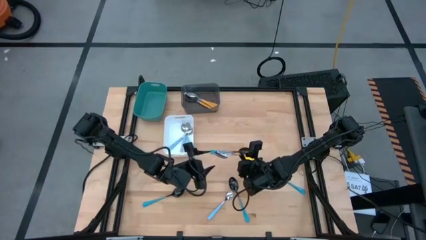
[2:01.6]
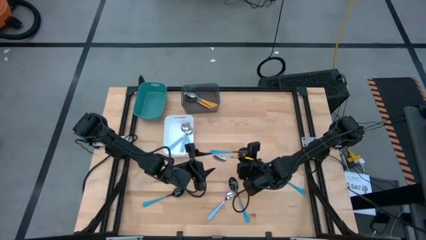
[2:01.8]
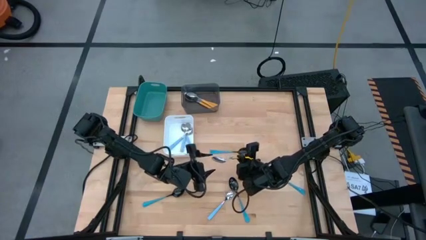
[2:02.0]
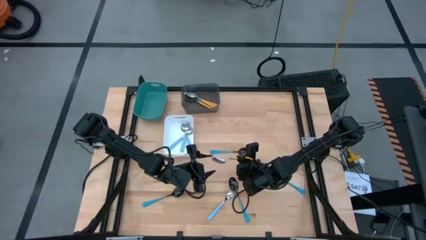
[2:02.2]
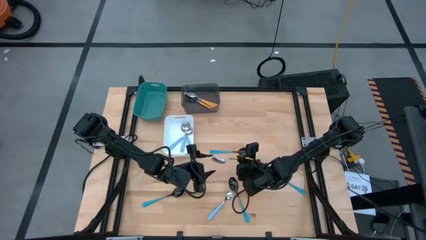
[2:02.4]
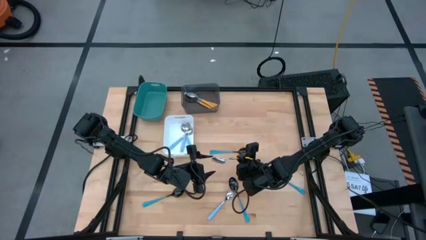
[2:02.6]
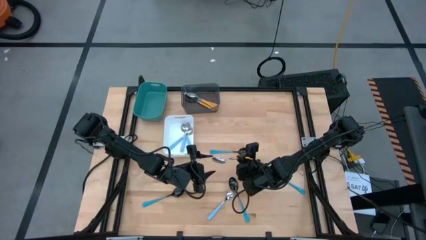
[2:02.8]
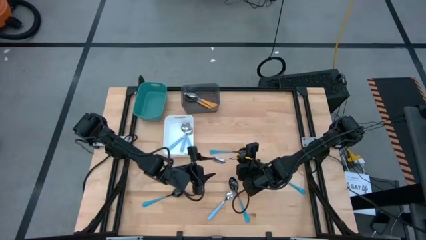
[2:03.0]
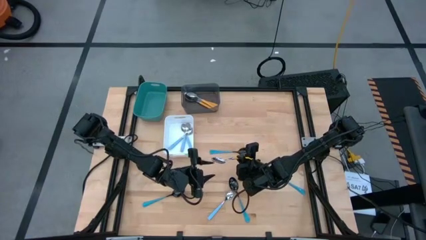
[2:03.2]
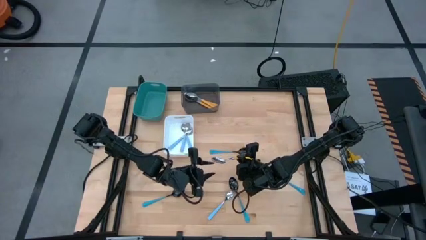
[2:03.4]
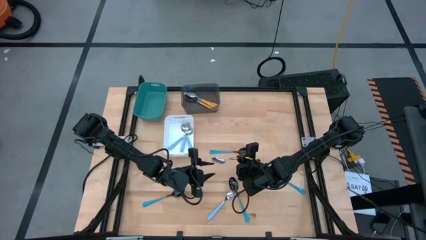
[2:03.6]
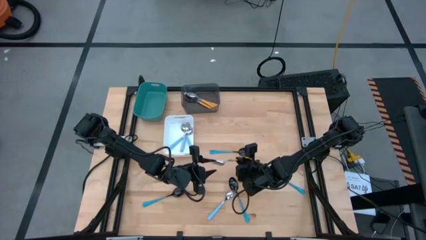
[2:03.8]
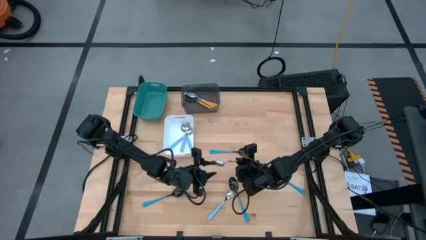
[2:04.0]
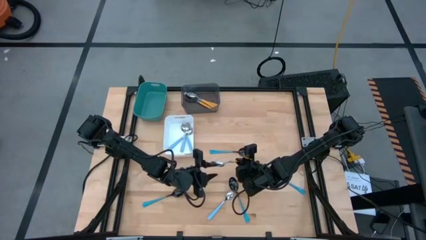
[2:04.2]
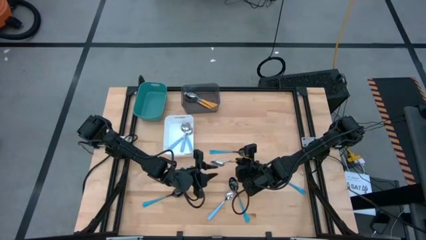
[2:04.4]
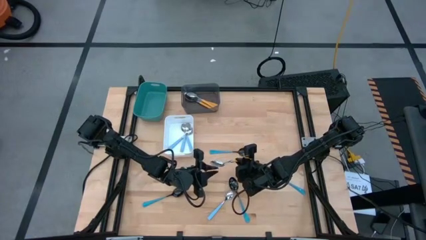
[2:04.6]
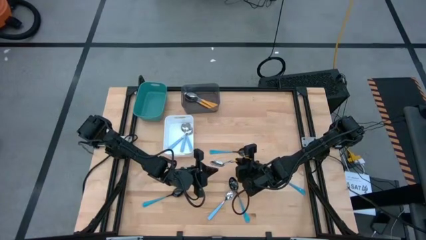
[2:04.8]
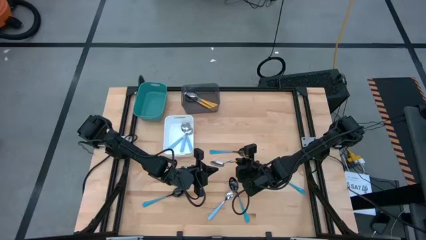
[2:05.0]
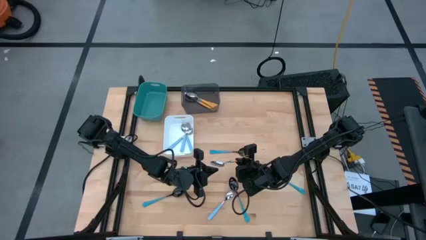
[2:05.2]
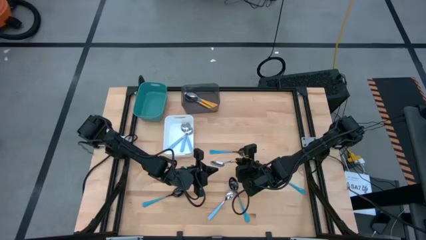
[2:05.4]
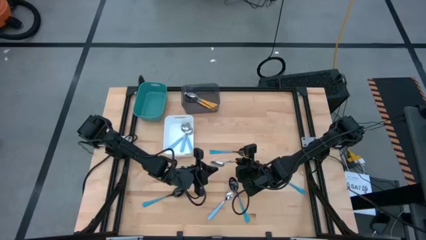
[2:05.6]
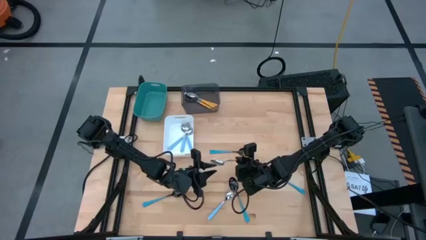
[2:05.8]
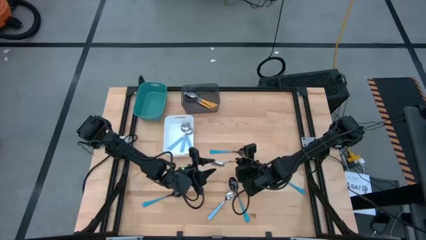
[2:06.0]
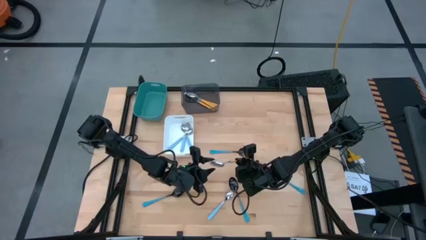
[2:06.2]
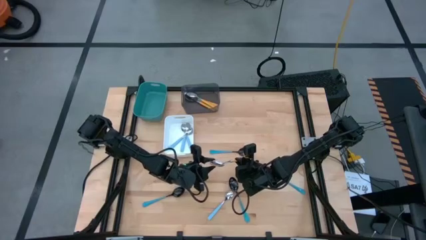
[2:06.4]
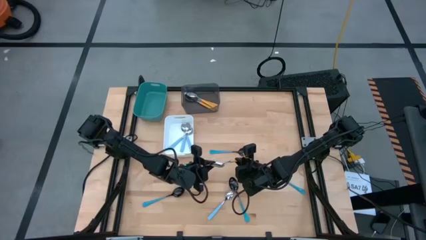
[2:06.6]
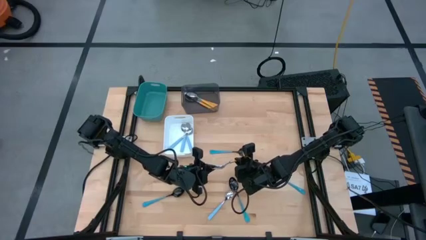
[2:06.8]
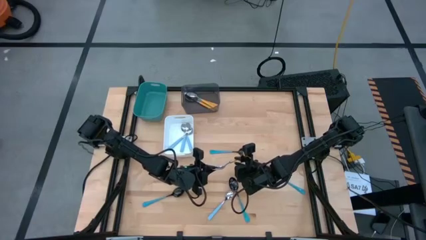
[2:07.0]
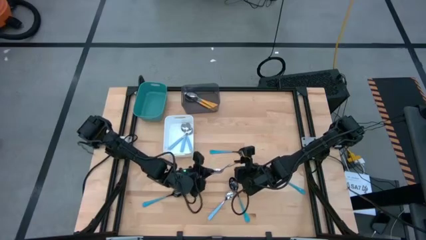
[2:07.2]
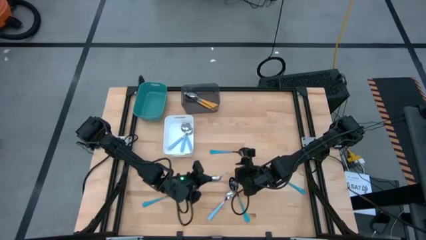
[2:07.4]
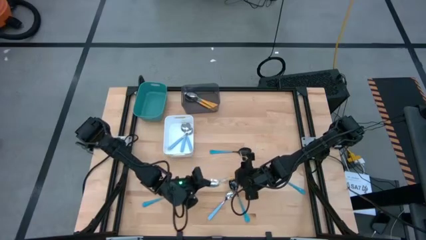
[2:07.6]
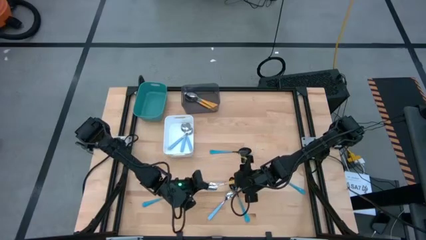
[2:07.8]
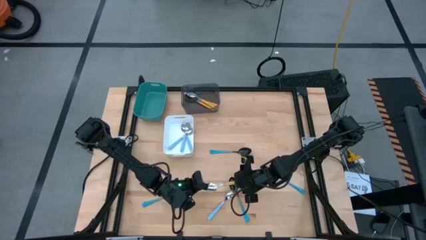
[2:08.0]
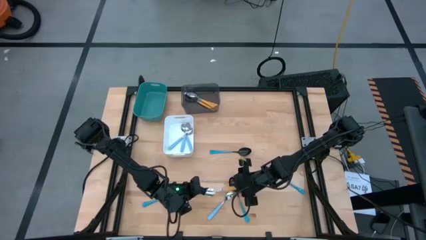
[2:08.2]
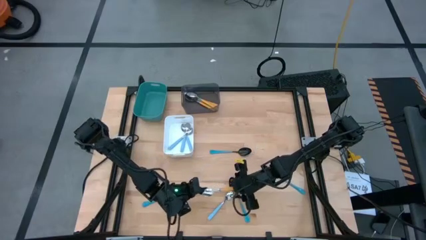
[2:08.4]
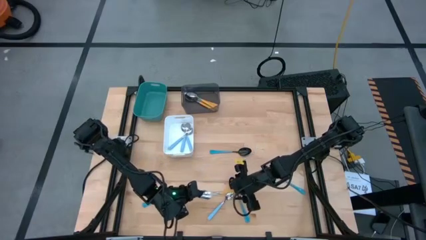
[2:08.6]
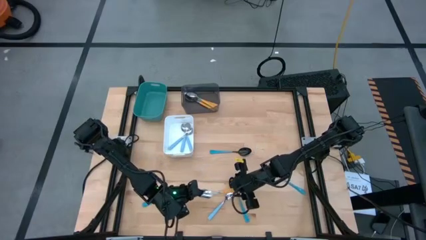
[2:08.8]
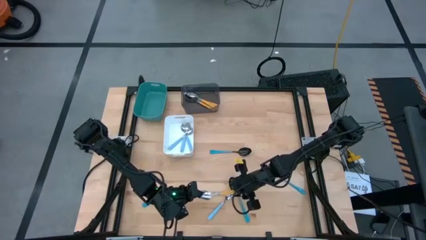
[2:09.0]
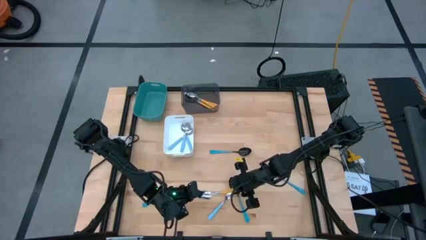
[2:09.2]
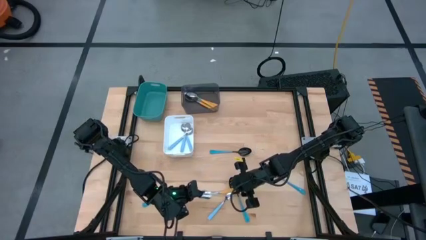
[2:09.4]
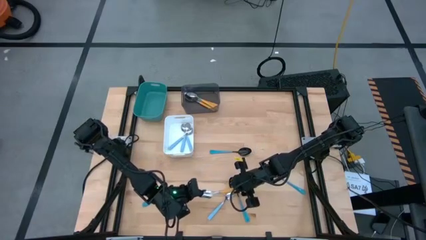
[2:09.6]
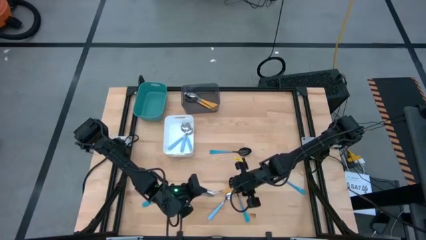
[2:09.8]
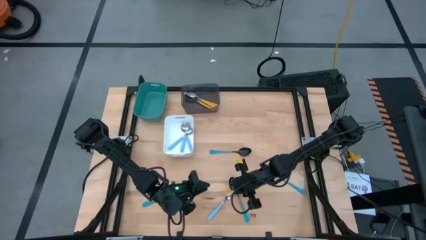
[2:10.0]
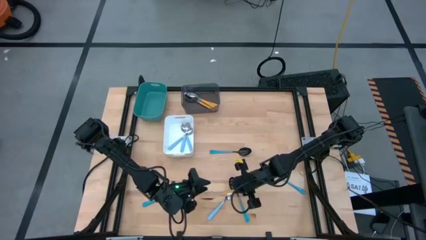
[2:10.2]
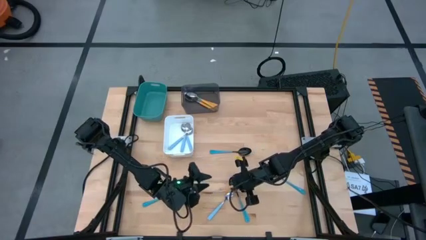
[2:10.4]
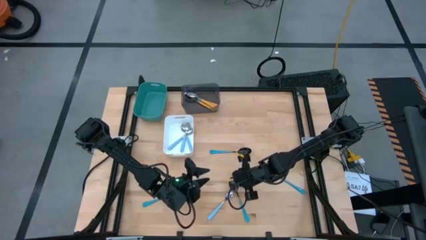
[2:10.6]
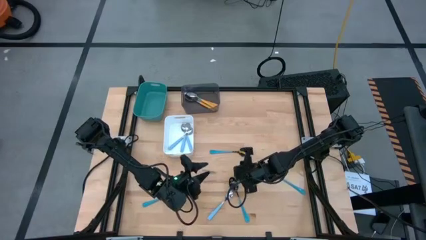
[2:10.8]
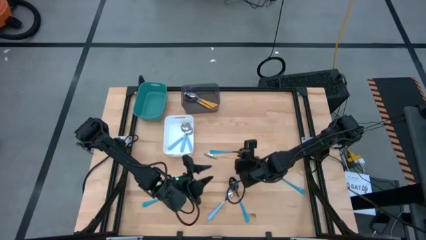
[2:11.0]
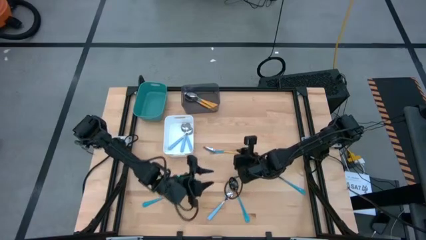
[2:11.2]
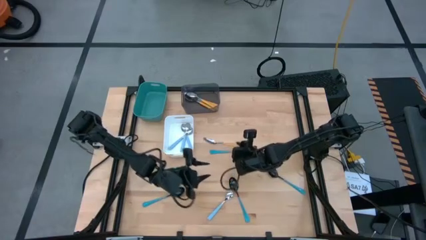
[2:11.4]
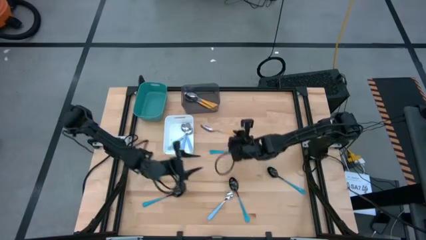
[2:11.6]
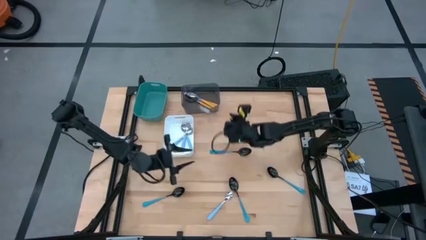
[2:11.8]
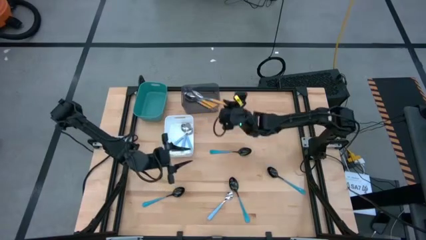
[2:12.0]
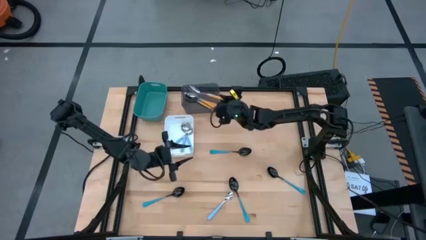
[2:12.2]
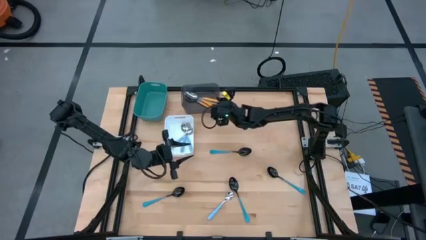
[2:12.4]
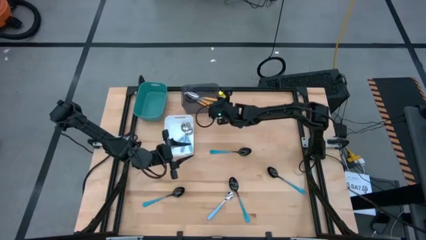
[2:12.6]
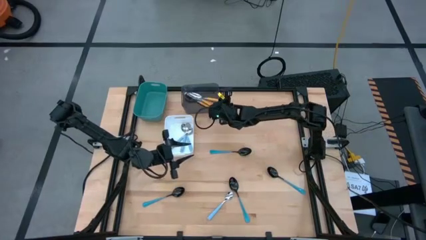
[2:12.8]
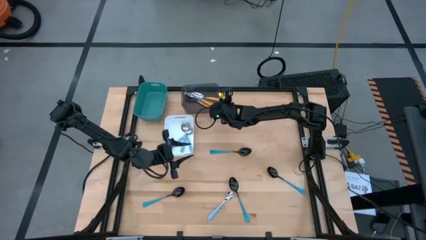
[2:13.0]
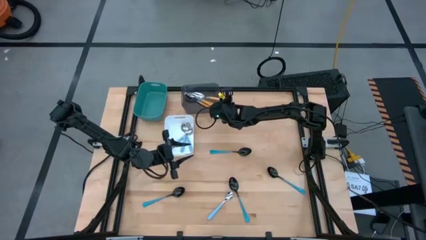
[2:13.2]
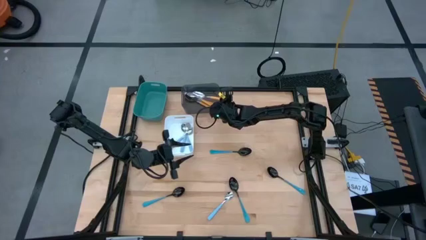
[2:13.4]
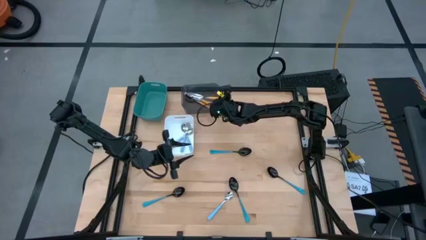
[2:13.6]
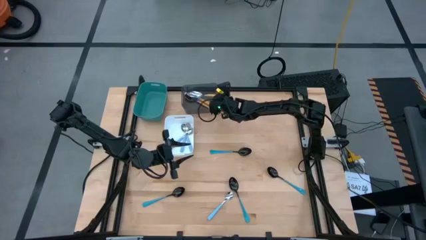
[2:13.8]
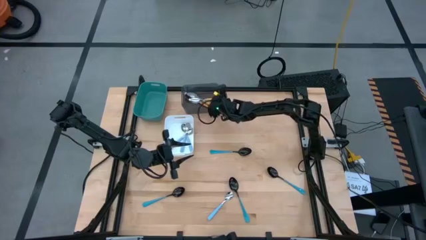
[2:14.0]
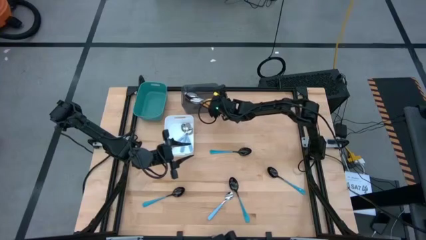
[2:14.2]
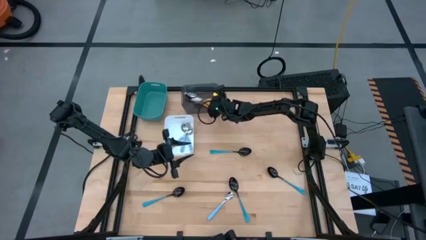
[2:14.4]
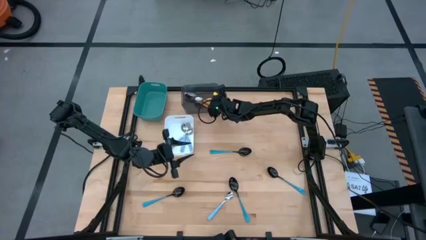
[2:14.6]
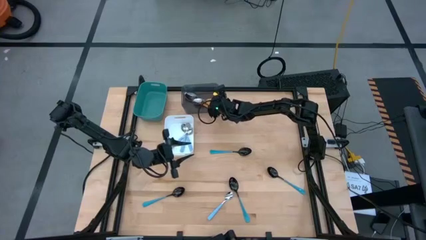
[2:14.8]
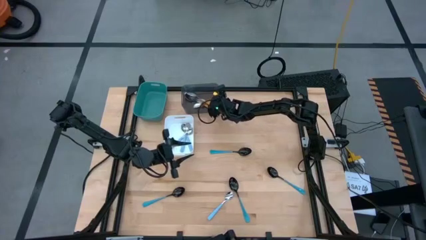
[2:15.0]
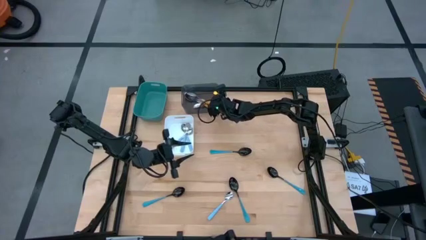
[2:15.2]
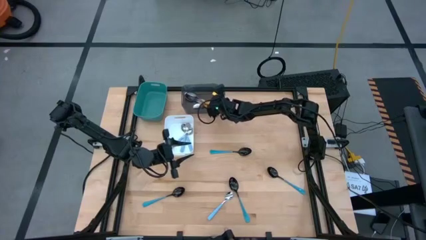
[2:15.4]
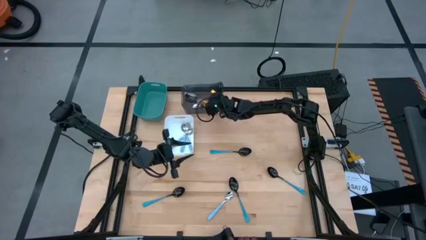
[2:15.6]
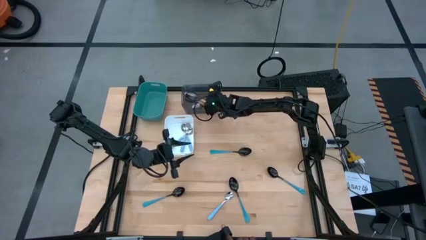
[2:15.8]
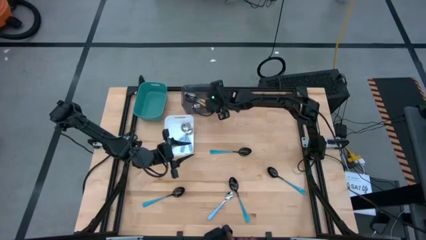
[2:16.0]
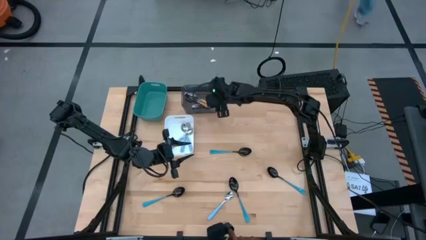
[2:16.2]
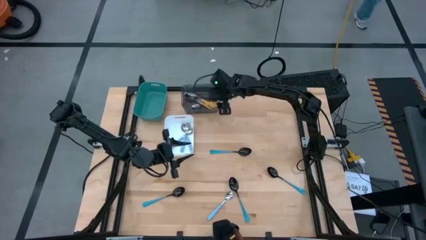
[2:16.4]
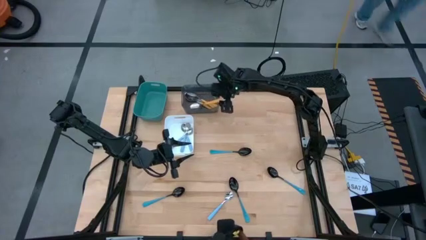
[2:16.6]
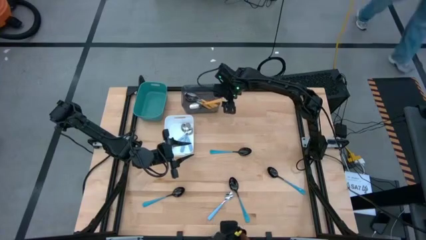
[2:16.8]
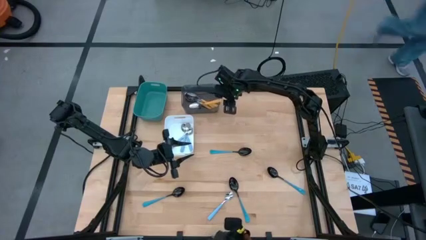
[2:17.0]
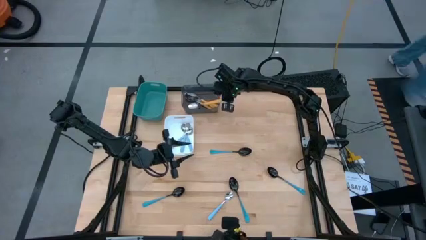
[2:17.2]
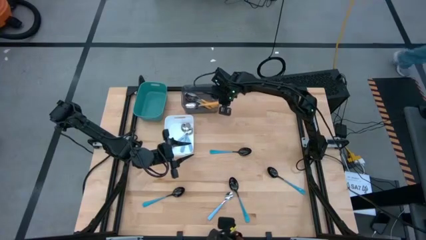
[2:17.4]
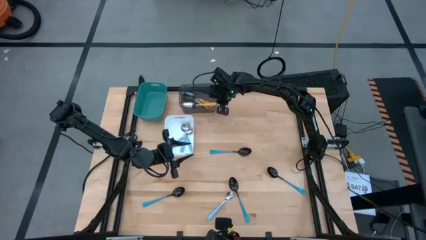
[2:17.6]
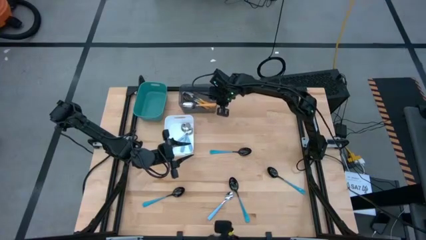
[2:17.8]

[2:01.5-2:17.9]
Task: Sort silverware by color (type)
Put the orange spoon into the black bin

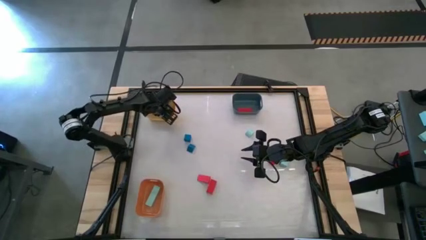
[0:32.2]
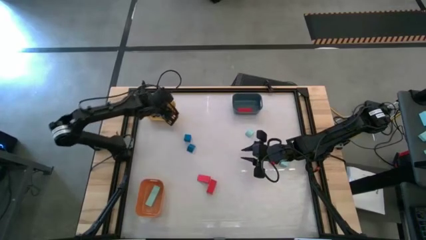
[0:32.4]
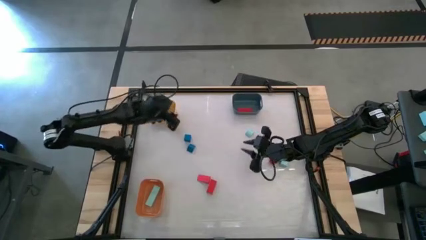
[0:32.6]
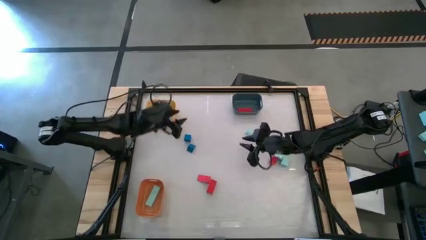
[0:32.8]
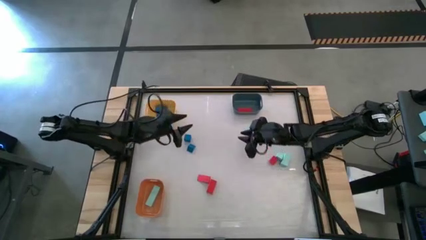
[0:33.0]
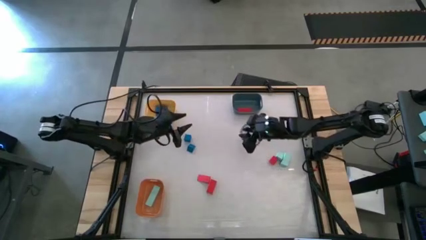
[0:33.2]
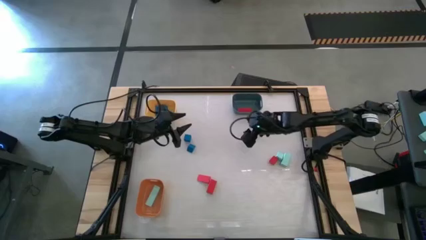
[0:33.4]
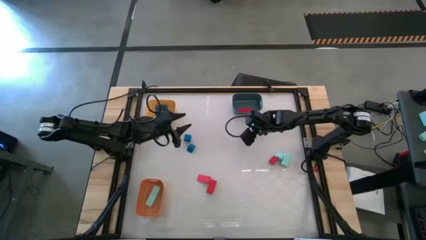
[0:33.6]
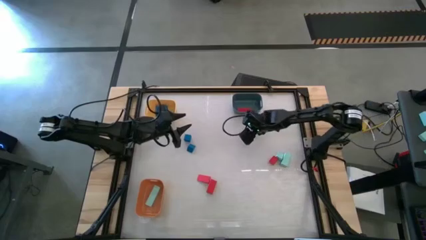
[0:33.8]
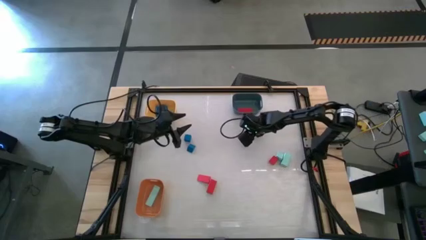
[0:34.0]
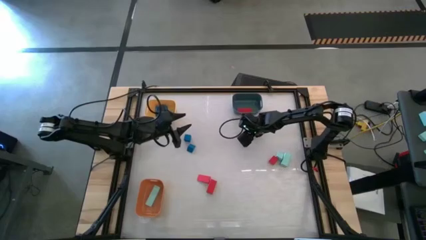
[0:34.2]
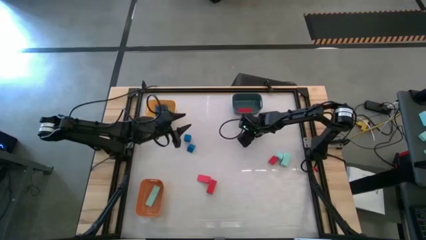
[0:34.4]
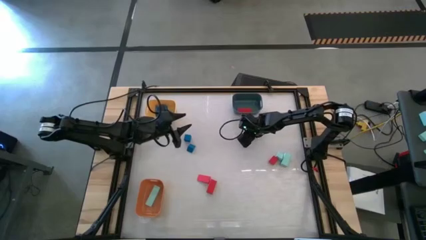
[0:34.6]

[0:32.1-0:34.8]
Task: Sort & place blocks by color
Put the top left light blue block into the orange bin
